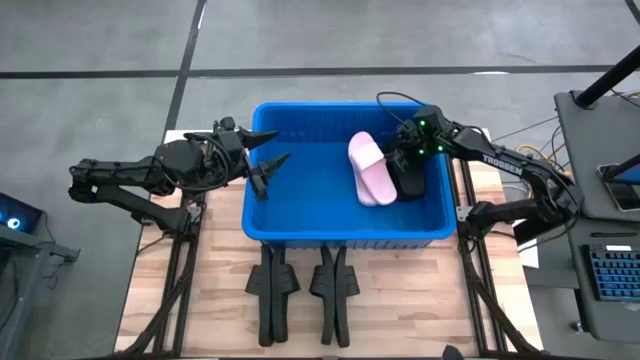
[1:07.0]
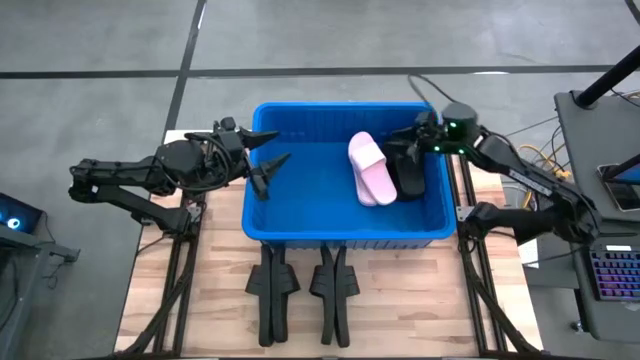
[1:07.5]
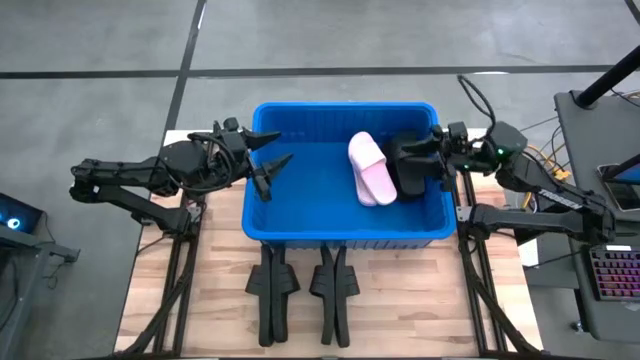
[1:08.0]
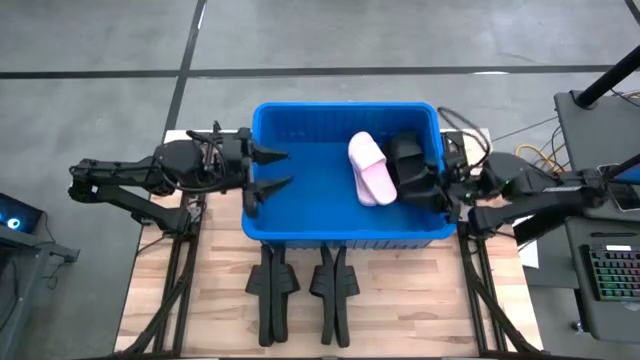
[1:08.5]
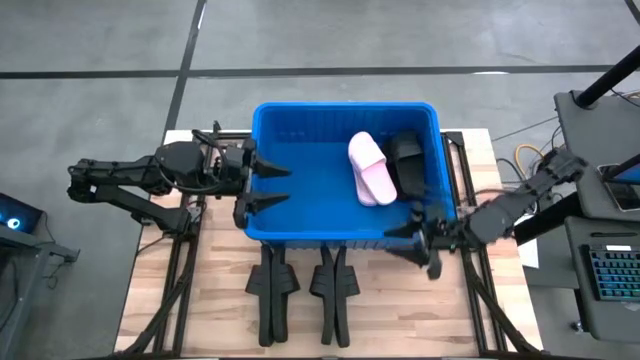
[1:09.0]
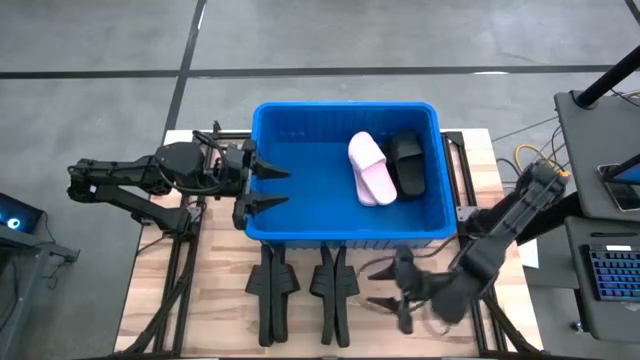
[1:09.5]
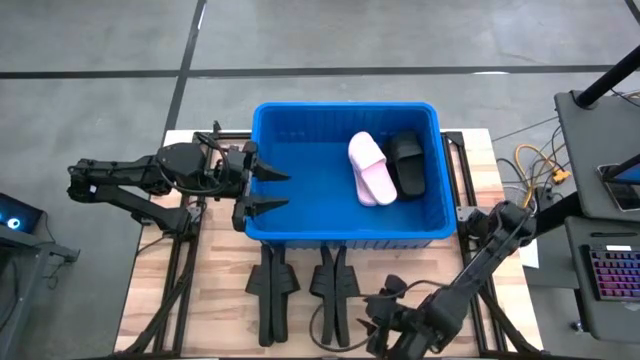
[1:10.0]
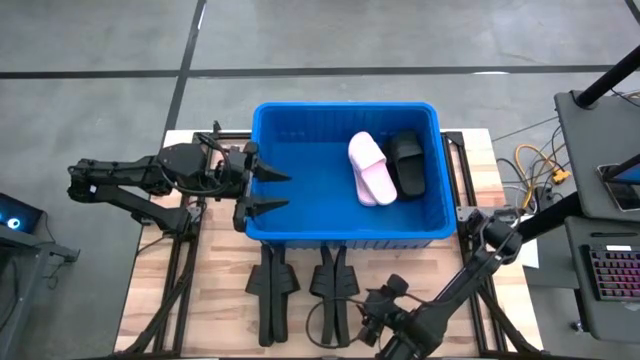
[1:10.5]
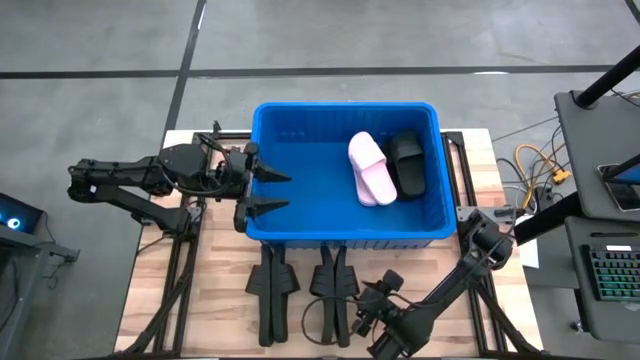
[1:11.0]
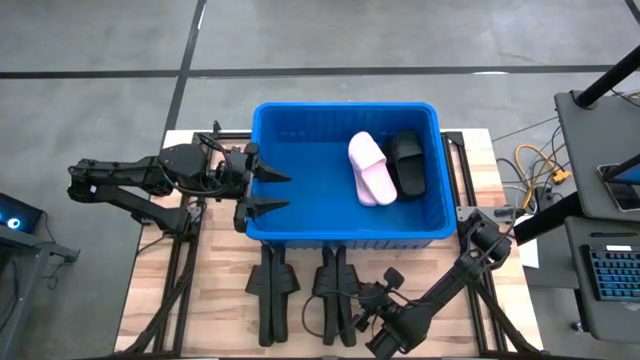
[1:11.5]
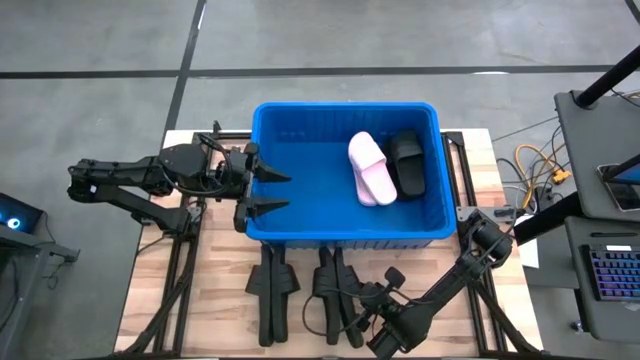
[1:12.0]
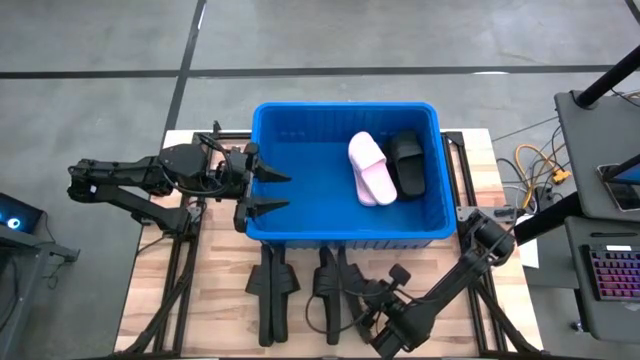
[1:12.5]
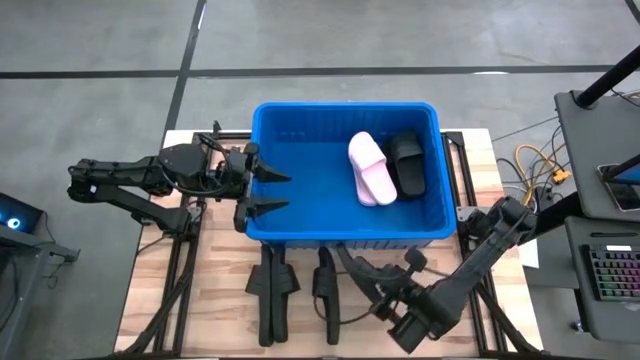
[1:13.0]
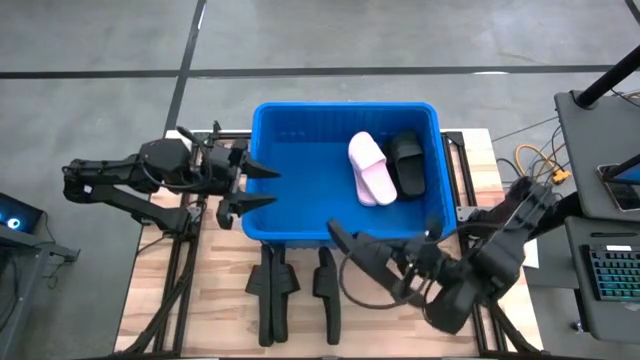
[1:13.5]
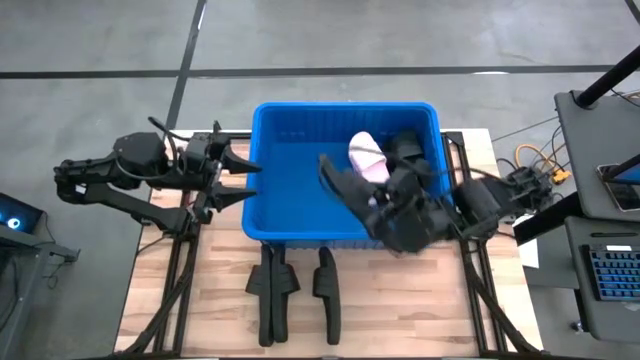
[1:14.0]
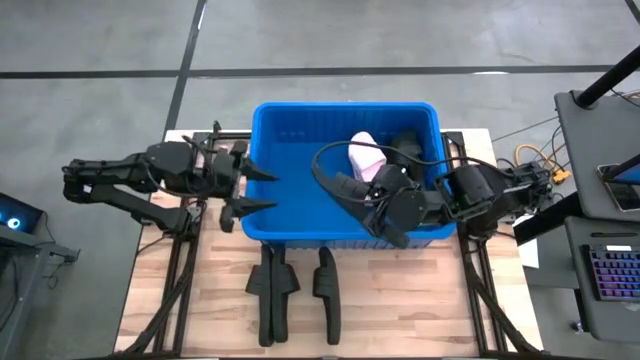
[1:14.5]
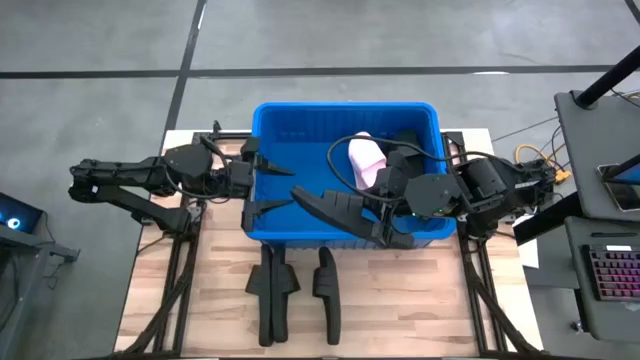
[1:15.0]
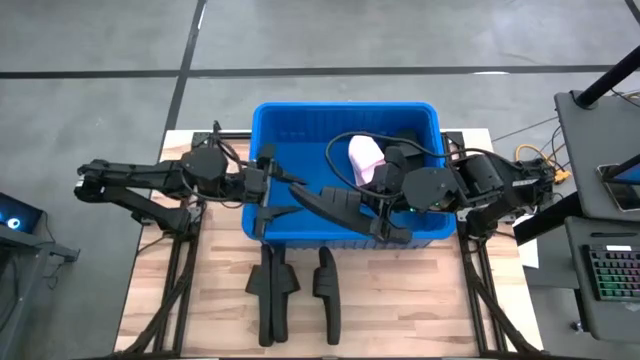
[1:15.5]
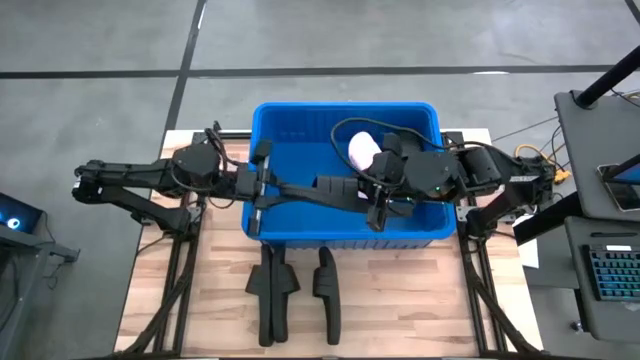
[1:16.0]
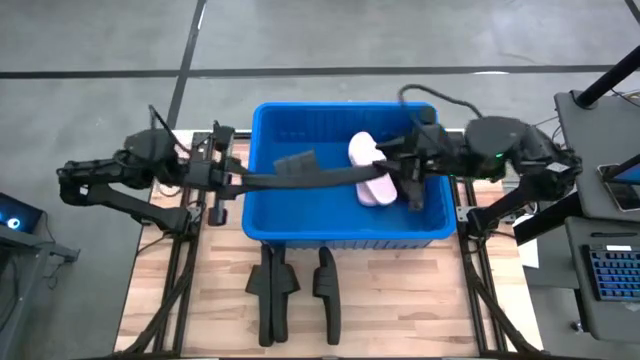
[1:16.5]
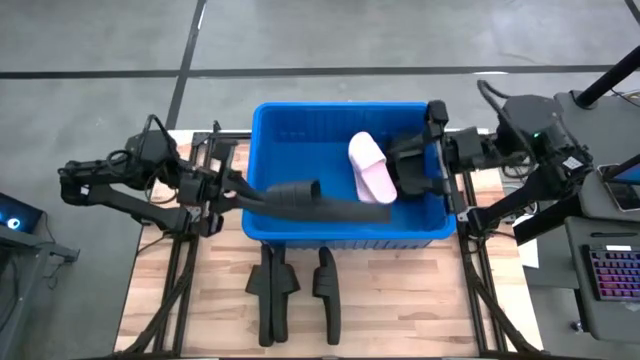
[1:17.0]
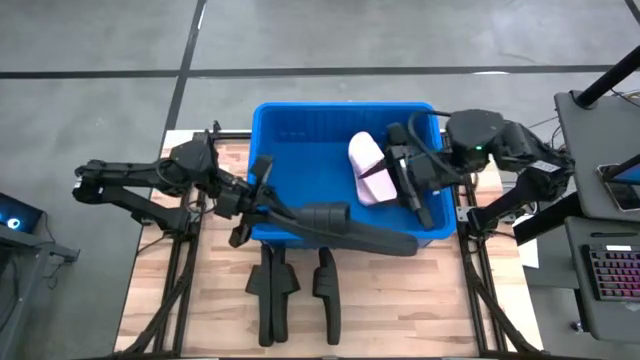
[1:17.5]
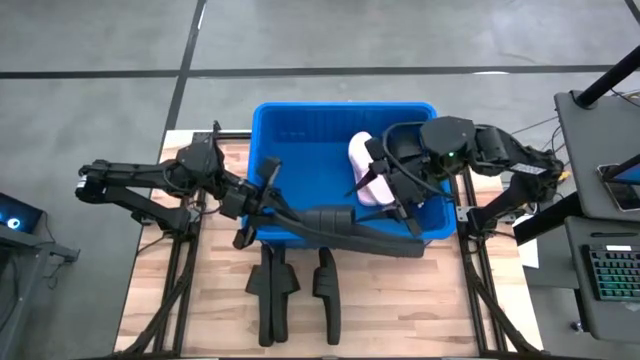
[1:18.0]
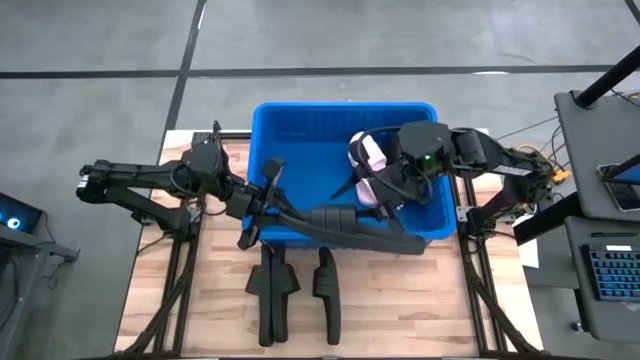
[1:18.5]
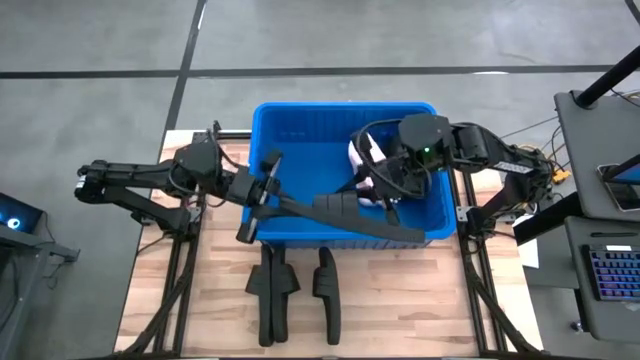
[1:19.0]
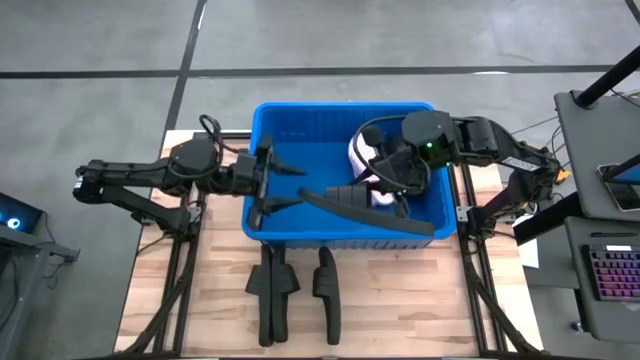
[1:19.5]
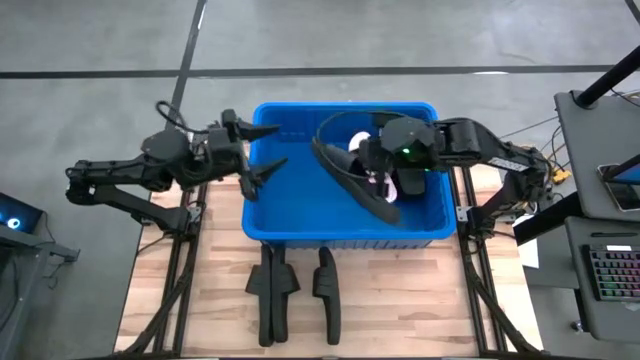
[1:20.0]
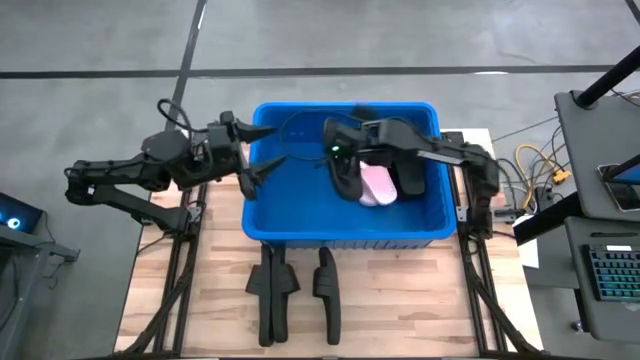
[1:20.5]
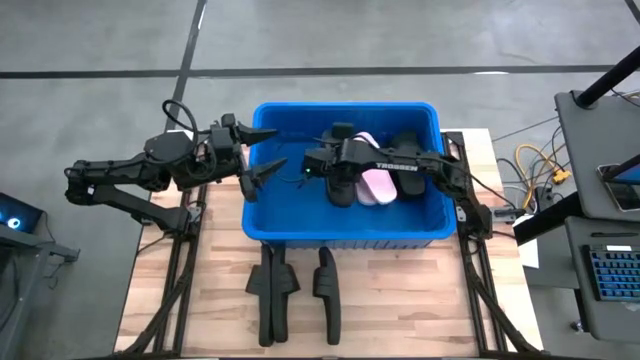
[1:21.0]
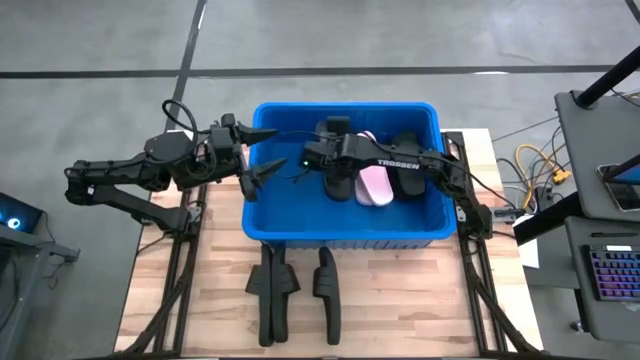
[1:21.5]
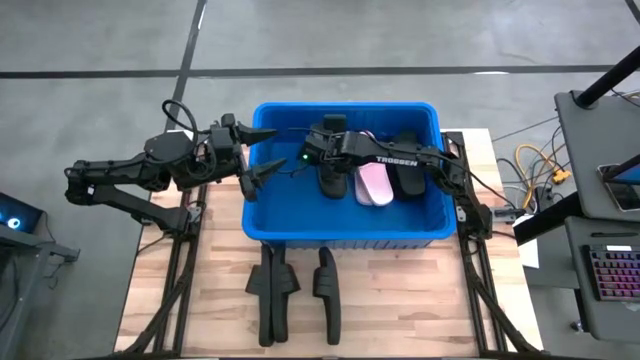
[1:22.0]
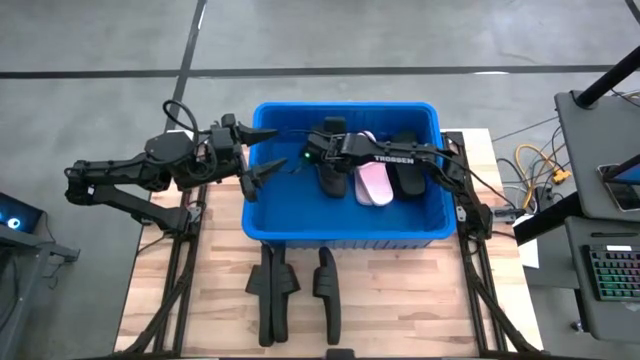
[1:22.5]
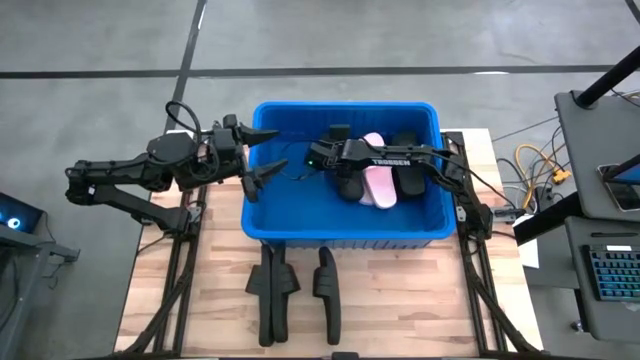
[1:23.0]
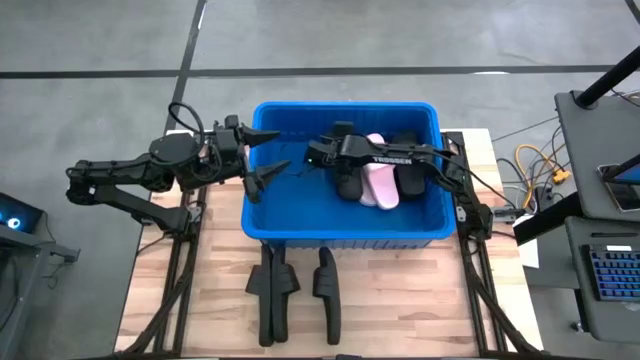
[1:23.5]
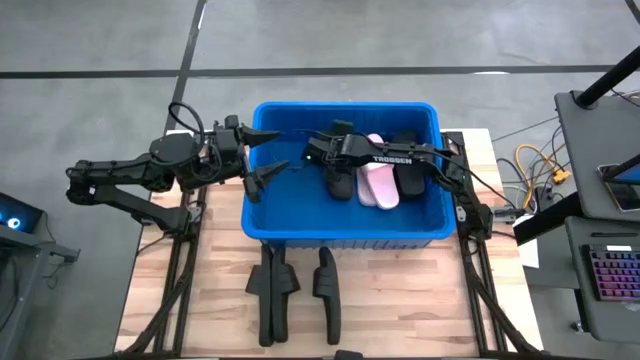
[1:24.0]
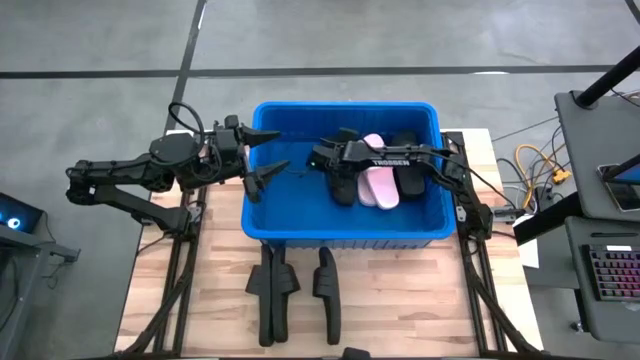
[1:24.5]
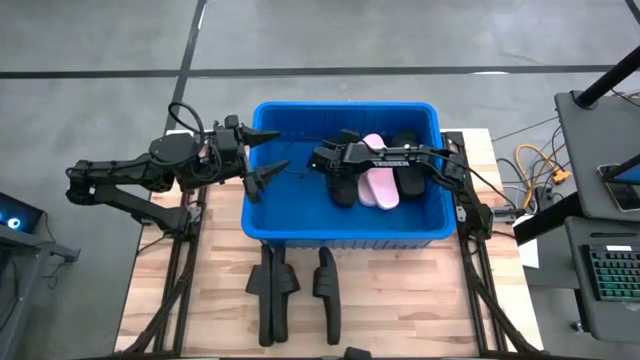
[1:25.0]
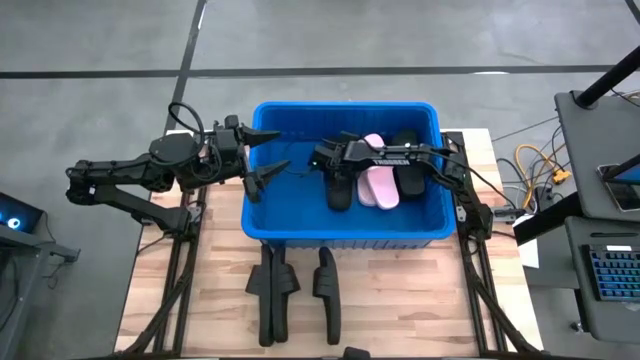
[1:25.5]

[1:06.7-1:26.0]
Task: Pick and place slides into bin
Put the black slide into the blue bin
